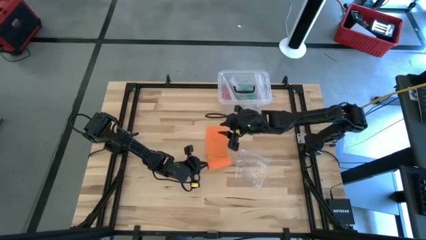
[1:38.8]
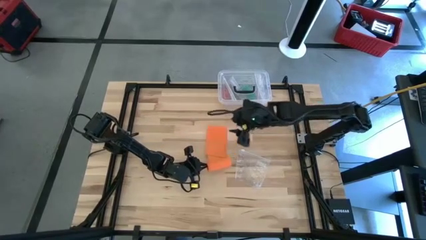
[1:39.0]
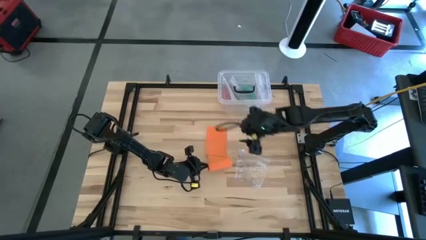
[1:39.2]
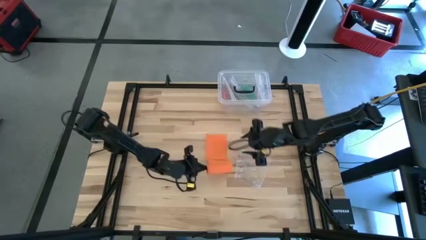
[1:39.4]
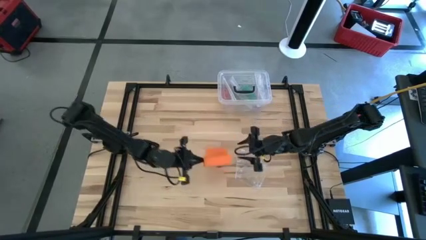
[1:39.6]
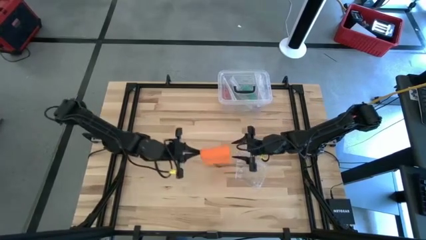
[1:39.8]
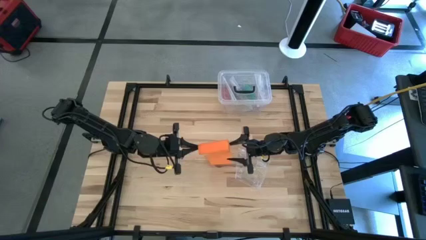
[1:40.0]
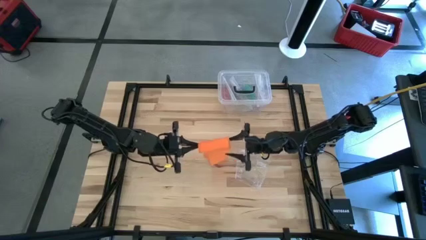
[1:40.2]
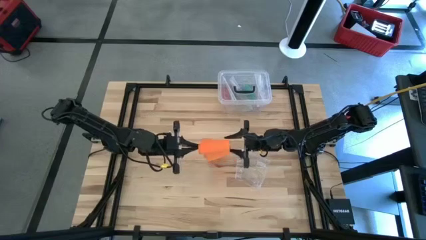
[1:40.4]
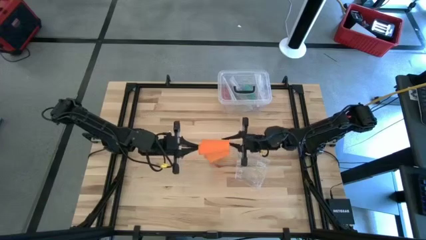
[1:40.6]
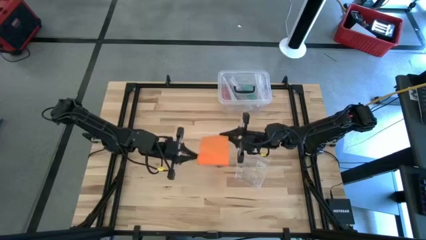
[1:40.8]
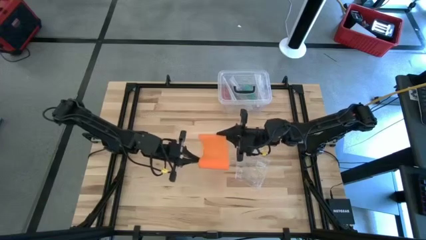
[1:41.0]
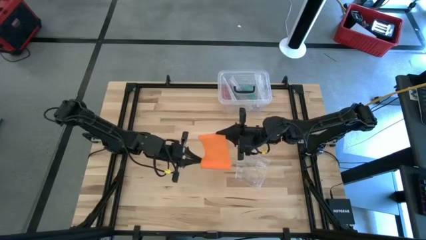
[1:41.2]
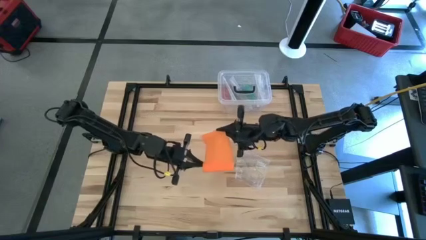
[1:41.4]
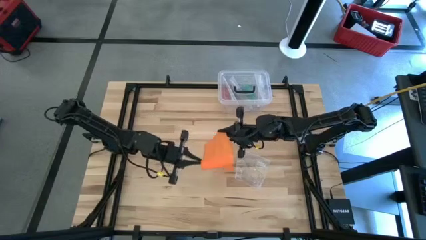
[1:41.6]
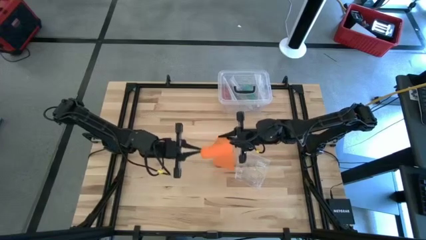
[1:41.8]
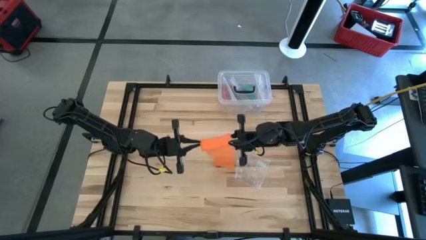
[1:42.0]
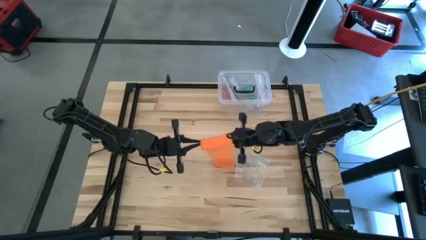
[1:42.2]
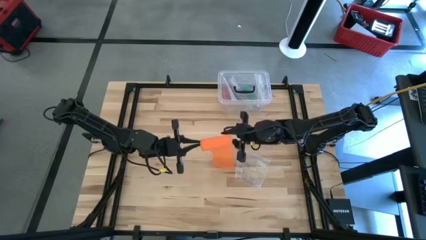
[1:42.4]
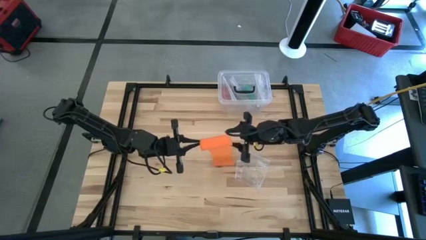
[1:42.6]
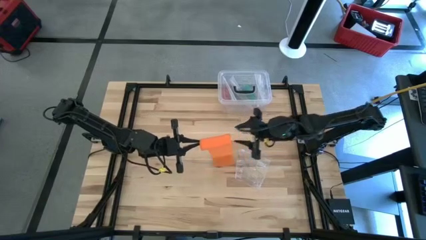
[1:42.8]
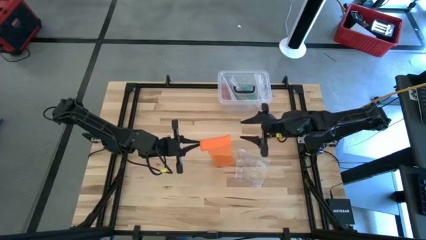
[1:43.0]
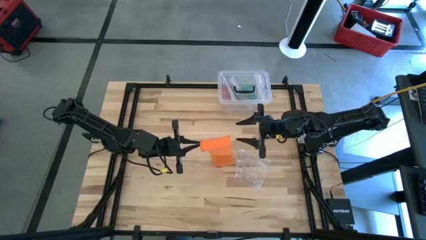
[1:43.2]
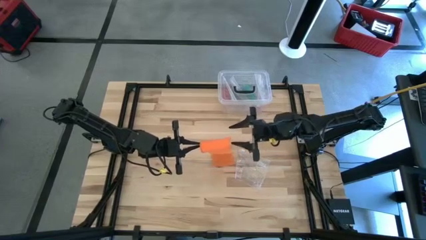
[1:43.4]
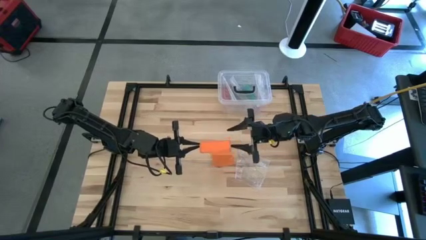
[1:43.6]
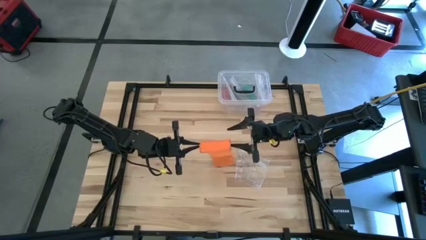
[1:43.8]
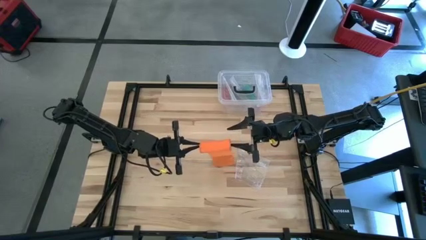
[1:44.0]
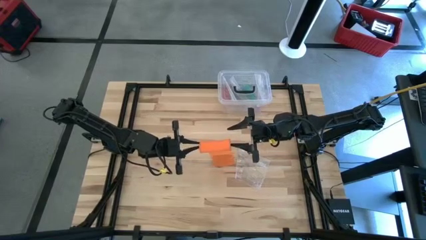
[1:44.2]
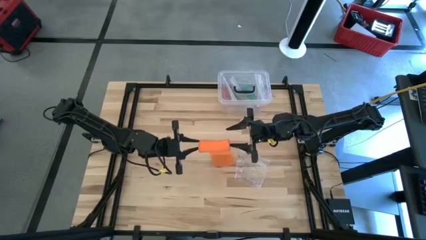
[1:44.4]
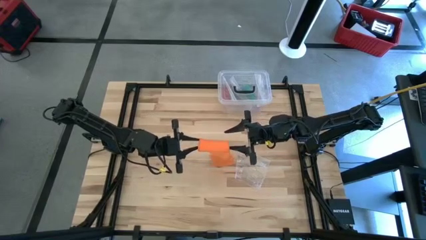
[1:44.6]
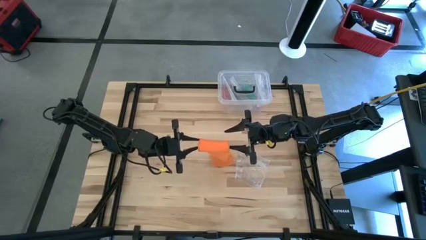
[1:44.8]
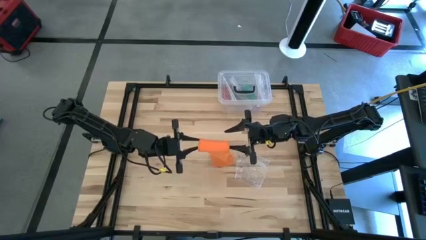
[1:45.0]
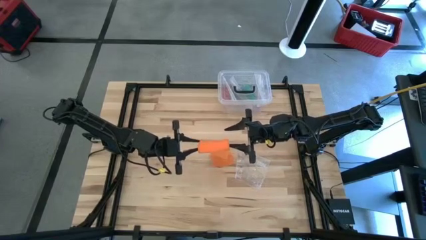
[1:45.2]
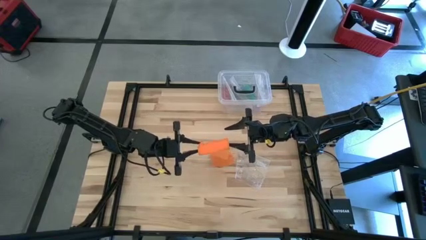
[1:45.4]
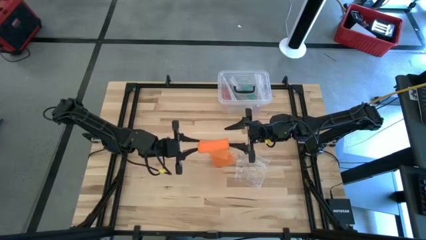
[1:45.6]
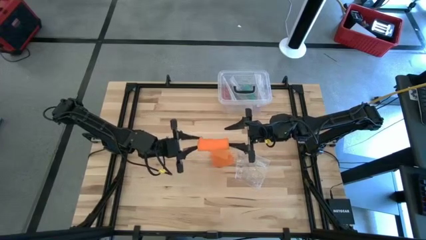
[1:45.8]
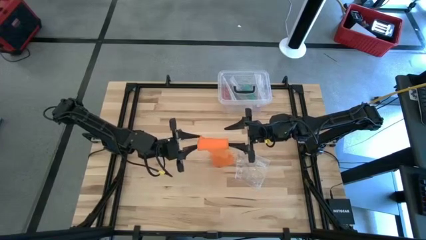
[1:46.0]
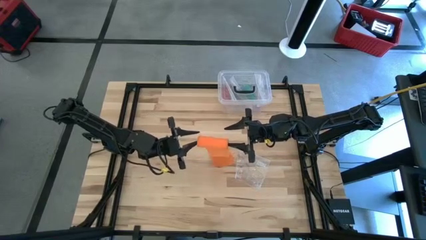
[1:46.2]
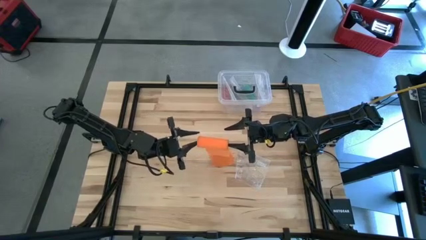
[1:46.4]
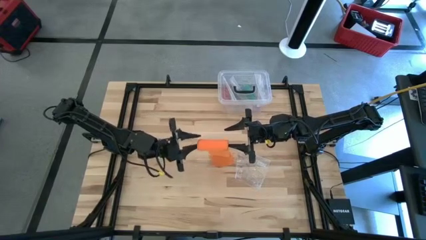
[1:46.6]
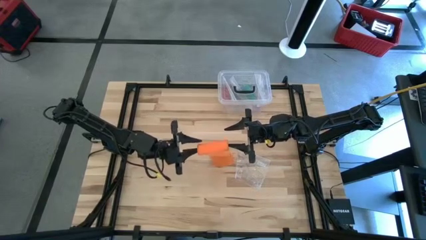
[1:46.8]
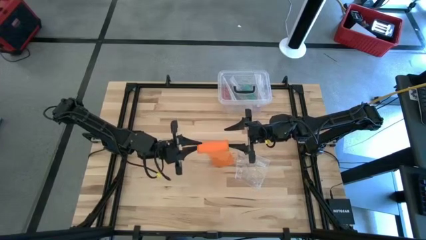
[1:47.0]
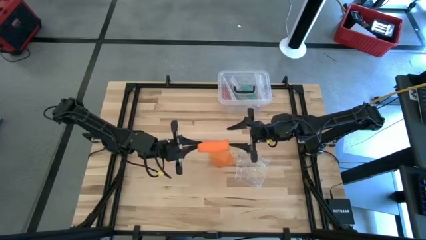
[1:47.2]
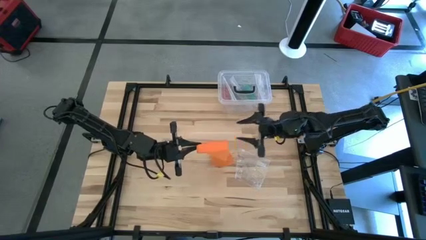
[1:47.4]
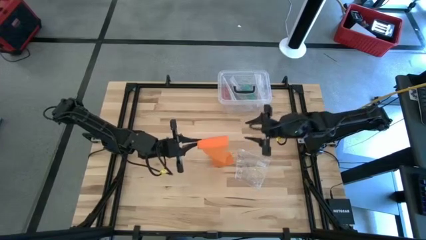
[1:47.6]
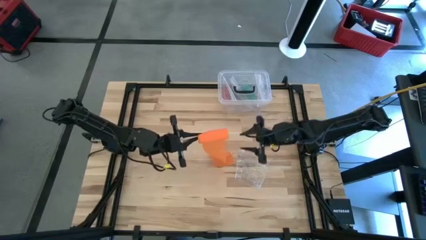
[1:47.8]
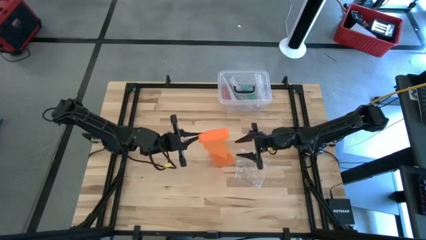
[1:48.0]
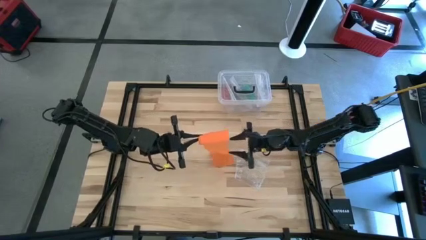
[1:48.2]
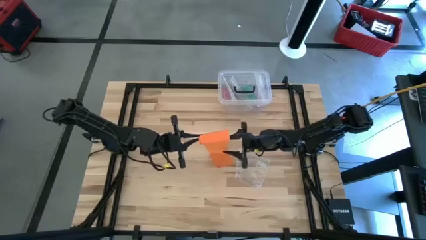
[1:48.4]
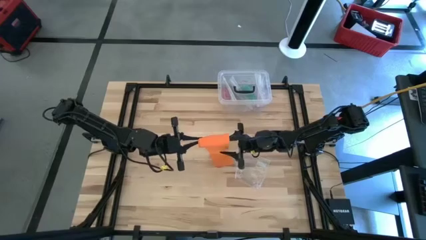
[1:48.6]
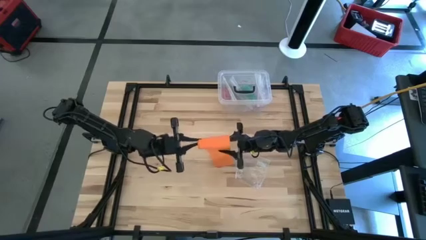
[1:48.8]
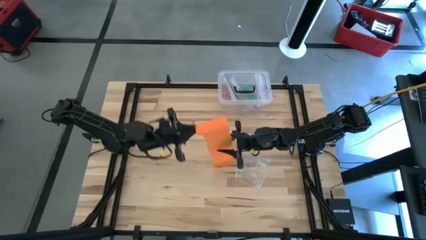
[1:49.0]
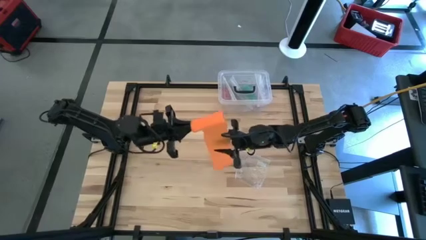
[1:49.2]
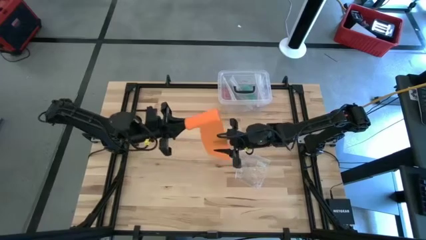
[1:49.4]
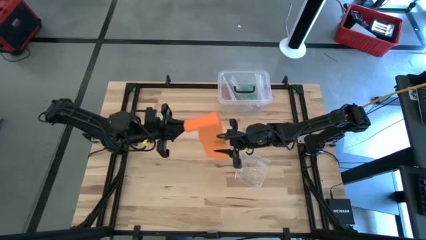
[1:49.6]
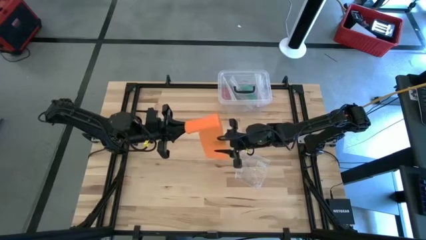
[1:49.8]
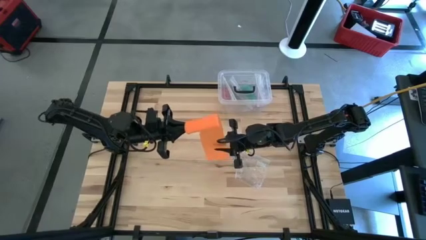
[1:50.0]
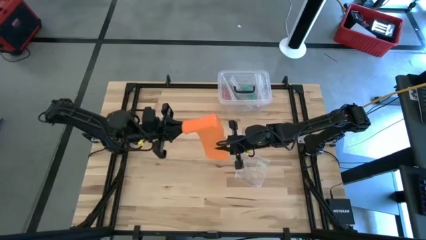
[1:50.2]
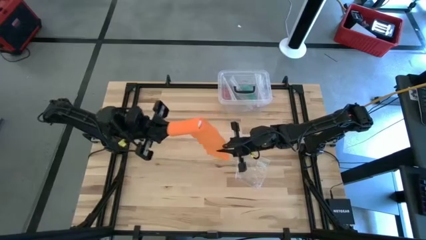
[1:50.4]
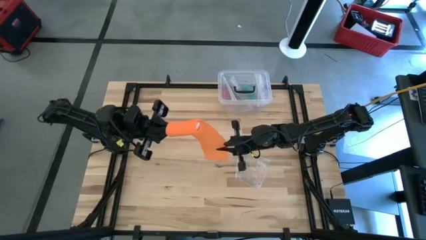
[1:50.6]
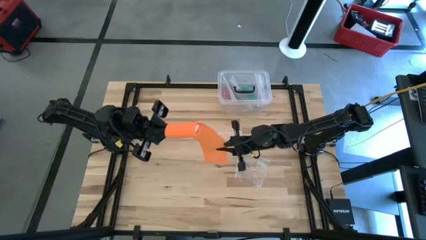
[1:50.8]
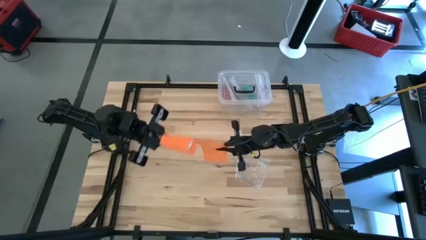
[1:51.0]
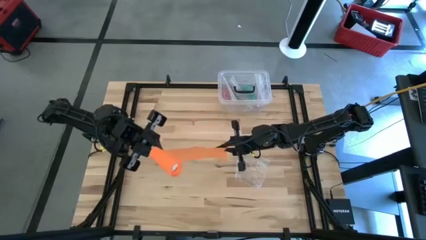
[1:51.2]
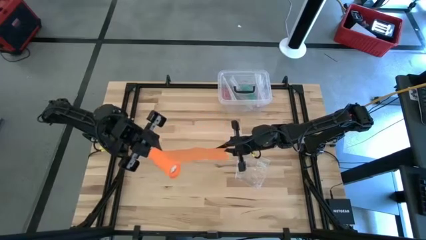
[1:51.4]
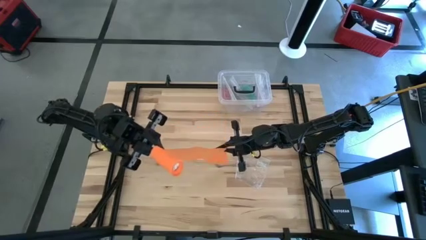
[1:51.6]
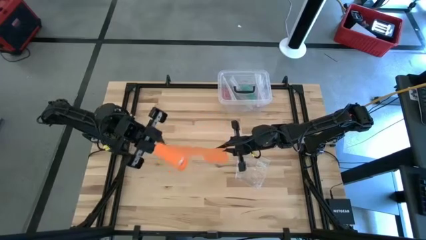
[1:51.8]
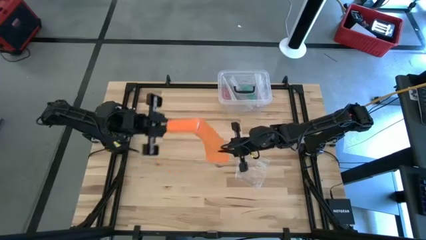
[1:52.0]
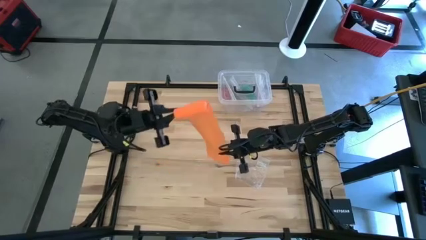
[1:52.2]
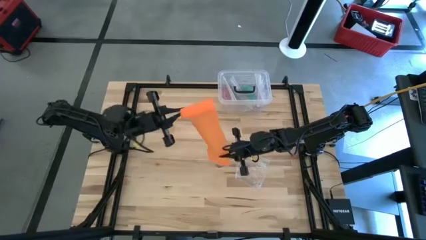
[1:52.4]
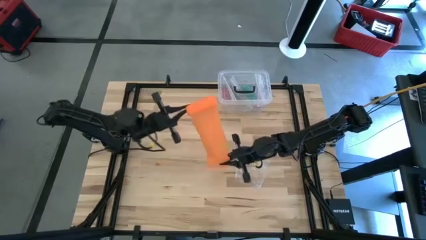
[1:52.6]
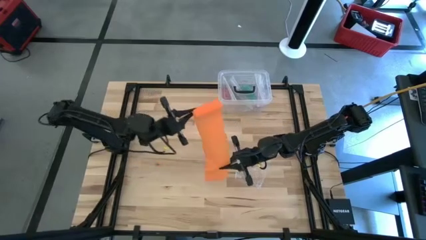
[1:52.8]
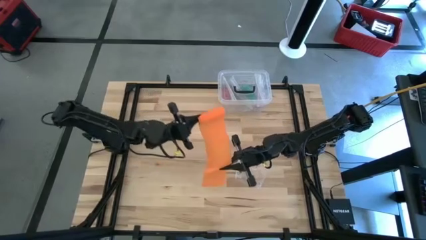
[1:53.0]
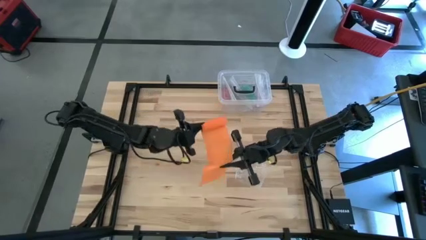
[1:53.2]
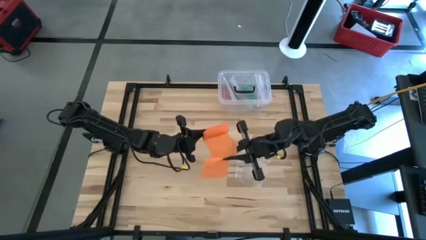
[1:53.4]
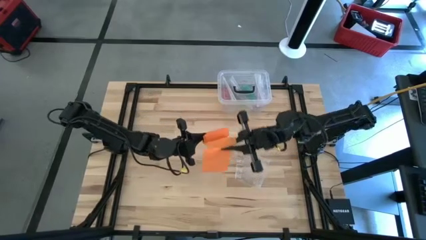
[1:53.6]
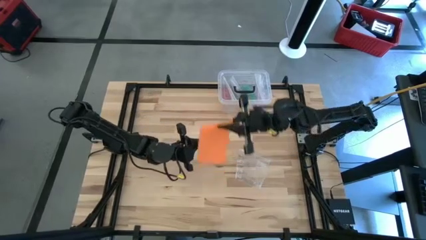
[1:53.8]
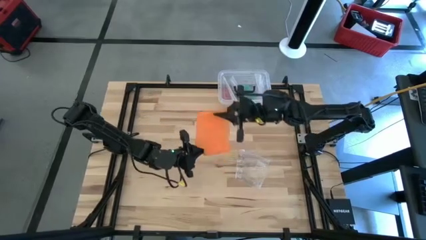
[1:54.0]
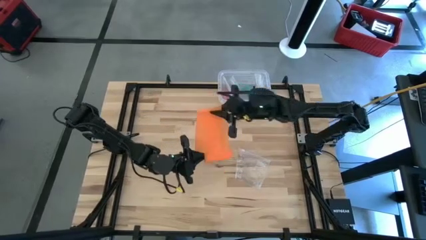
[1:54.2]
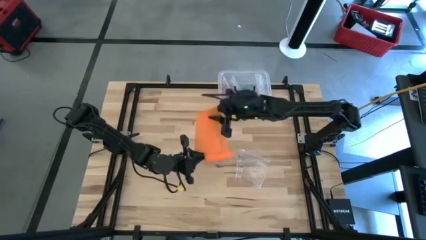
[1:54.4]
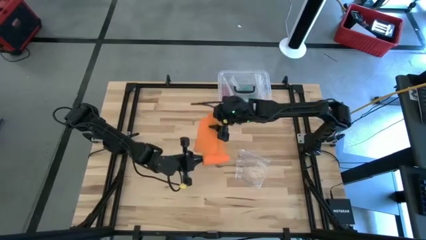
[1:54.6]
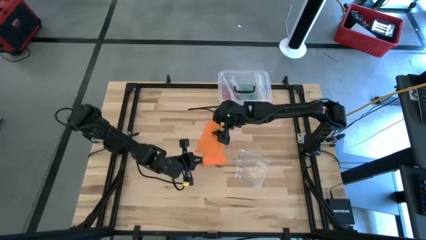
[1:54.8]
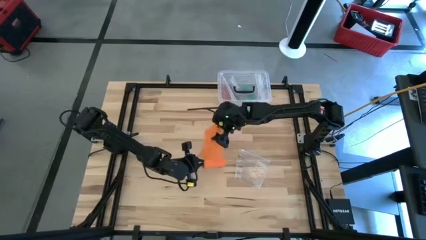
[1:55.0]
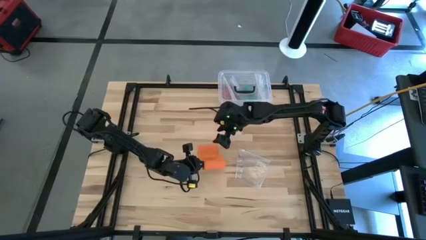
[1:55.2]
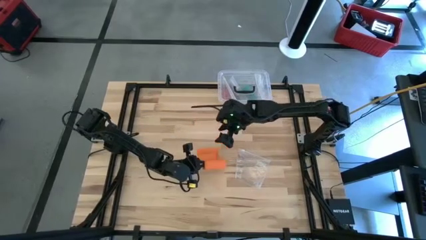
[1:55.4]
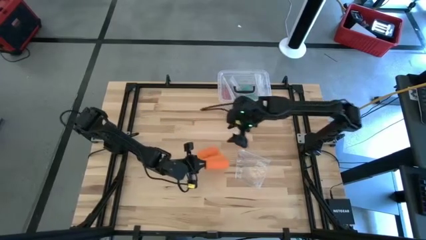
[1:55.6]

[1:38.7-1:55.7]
Task: Roll bandage
Roll the orange bandage
